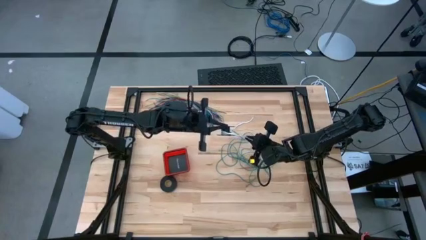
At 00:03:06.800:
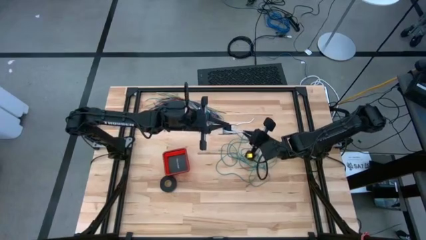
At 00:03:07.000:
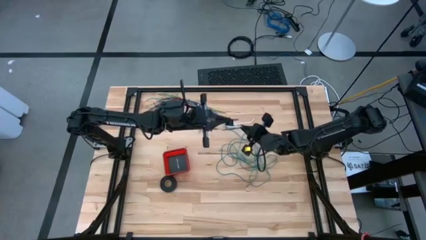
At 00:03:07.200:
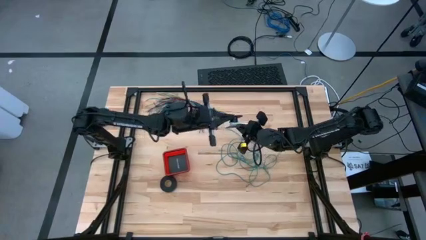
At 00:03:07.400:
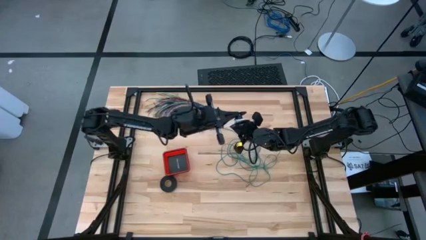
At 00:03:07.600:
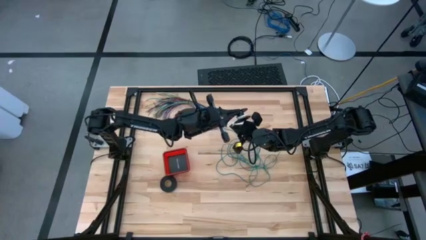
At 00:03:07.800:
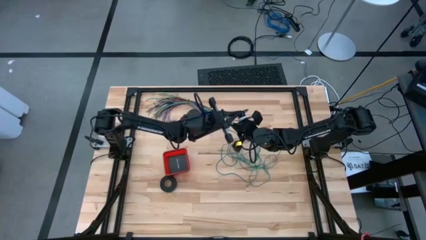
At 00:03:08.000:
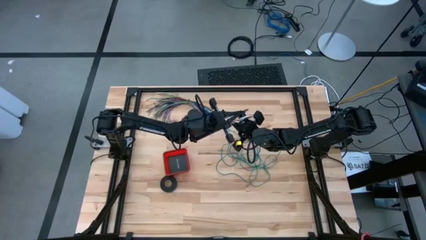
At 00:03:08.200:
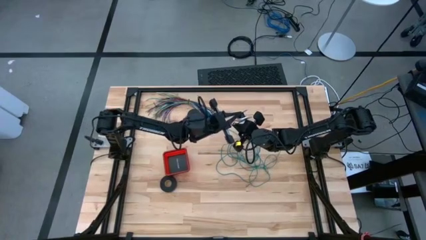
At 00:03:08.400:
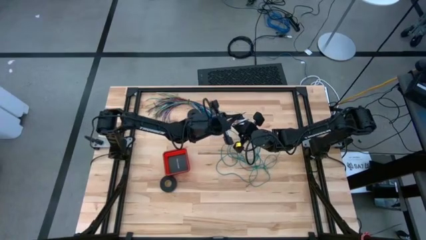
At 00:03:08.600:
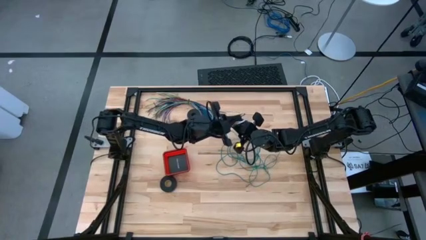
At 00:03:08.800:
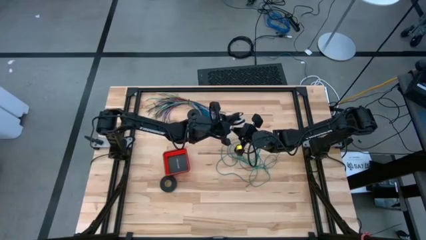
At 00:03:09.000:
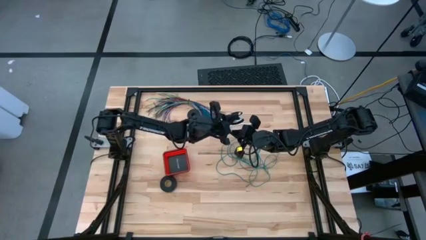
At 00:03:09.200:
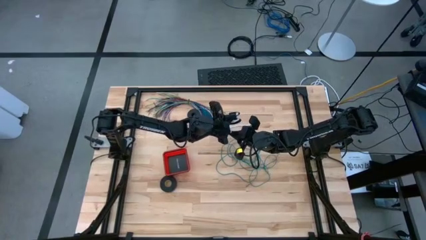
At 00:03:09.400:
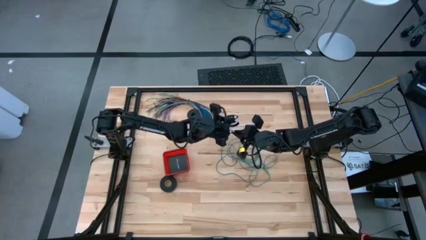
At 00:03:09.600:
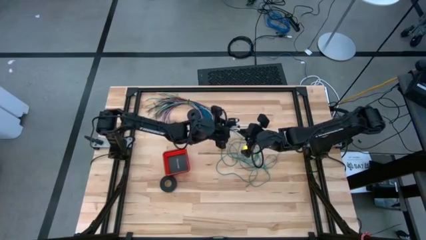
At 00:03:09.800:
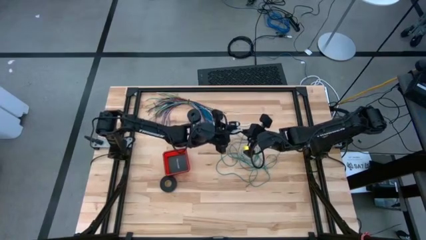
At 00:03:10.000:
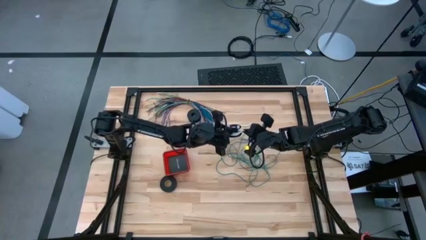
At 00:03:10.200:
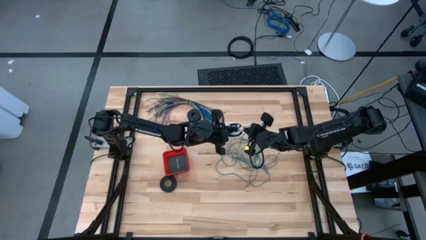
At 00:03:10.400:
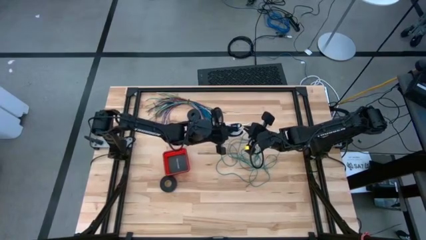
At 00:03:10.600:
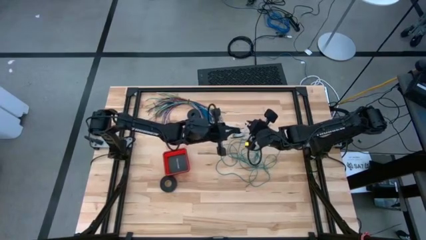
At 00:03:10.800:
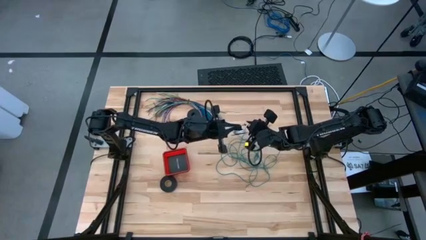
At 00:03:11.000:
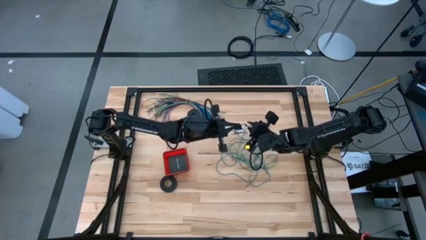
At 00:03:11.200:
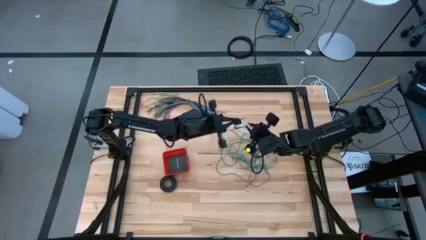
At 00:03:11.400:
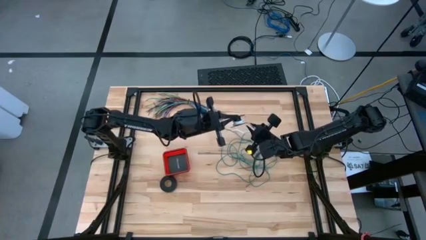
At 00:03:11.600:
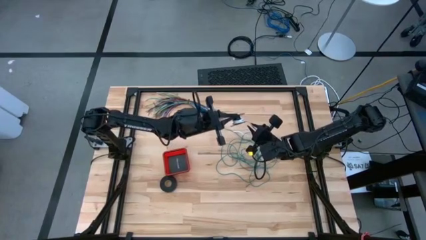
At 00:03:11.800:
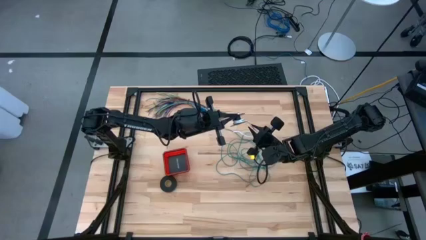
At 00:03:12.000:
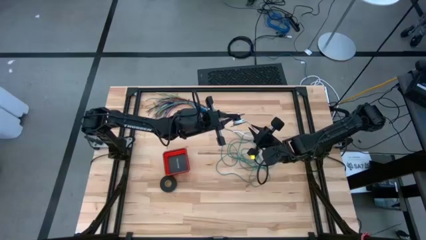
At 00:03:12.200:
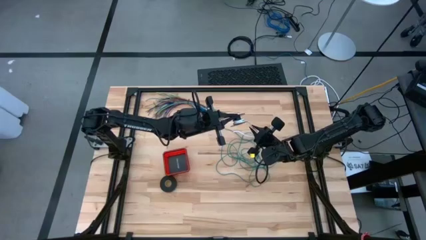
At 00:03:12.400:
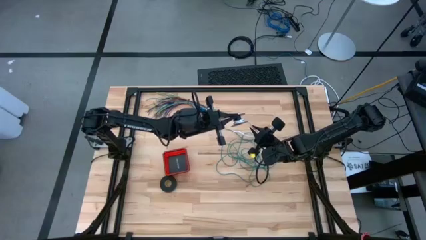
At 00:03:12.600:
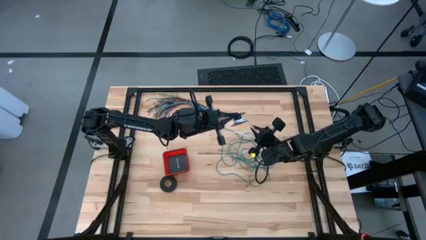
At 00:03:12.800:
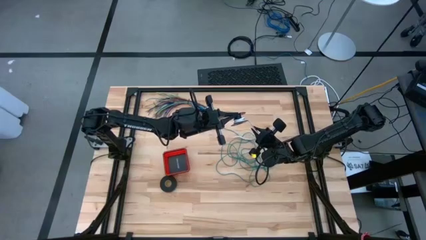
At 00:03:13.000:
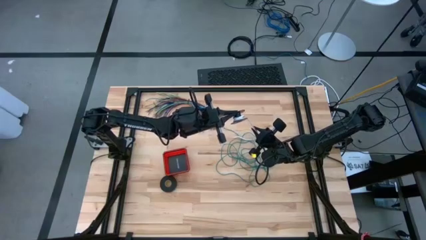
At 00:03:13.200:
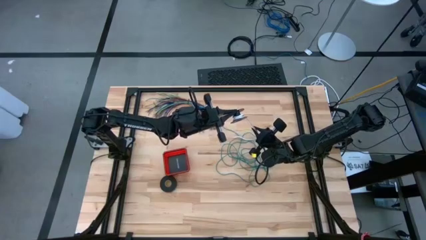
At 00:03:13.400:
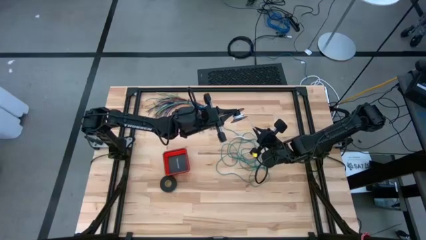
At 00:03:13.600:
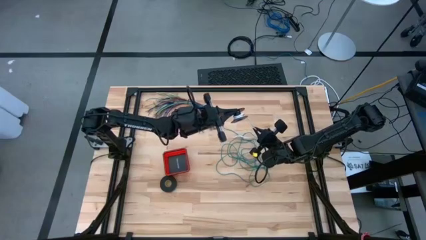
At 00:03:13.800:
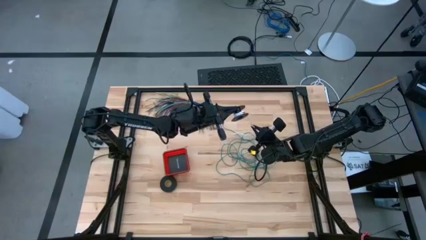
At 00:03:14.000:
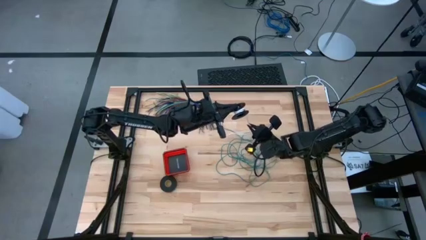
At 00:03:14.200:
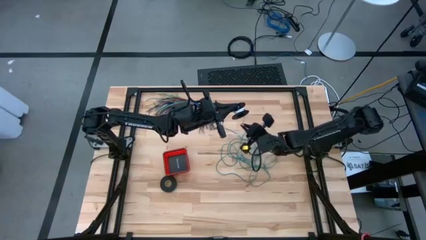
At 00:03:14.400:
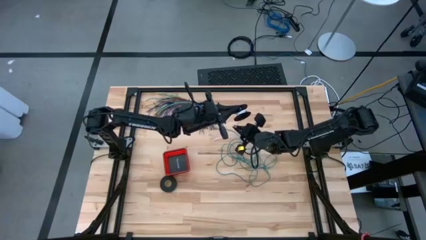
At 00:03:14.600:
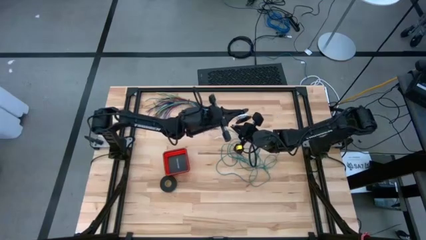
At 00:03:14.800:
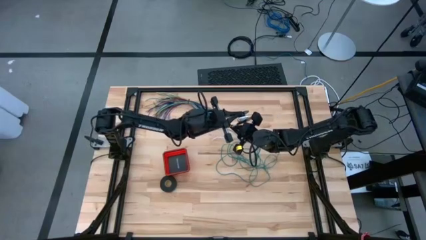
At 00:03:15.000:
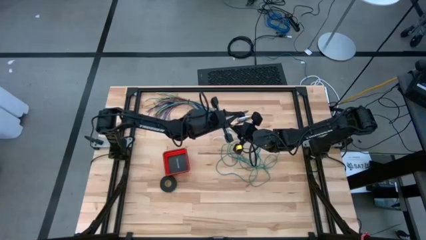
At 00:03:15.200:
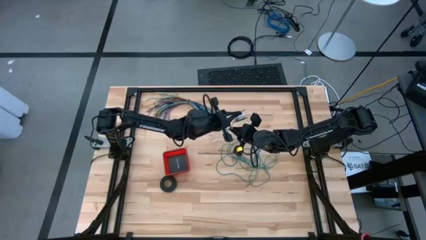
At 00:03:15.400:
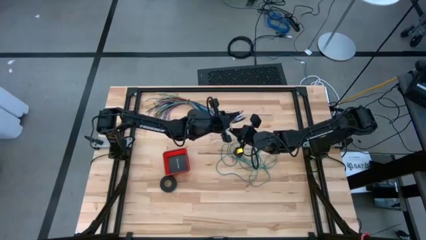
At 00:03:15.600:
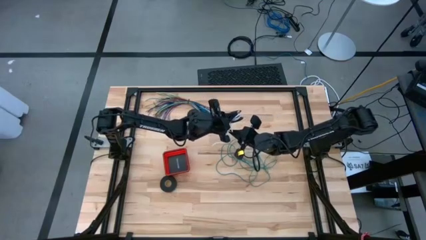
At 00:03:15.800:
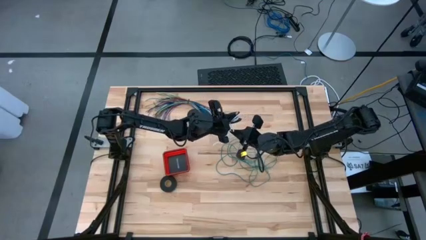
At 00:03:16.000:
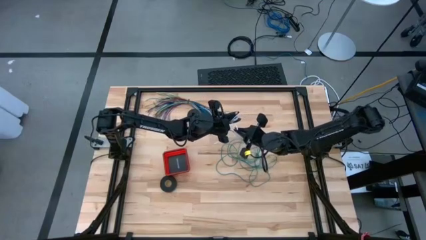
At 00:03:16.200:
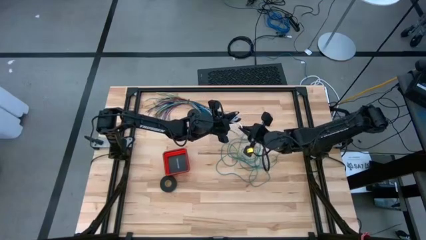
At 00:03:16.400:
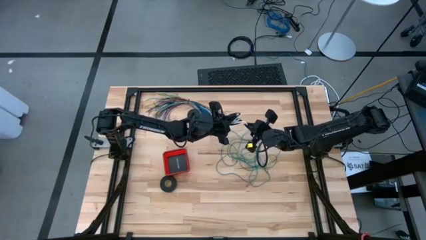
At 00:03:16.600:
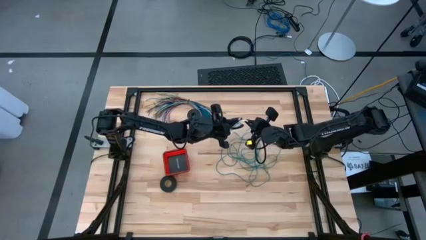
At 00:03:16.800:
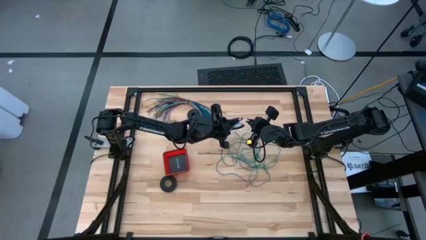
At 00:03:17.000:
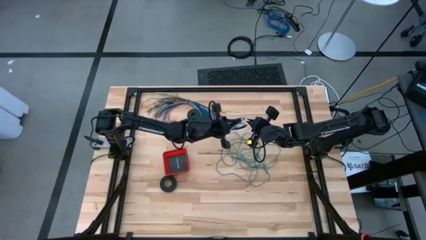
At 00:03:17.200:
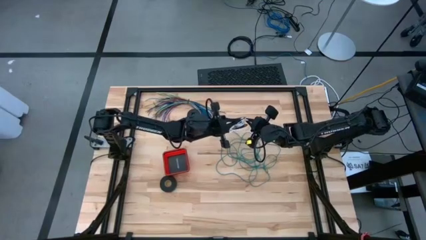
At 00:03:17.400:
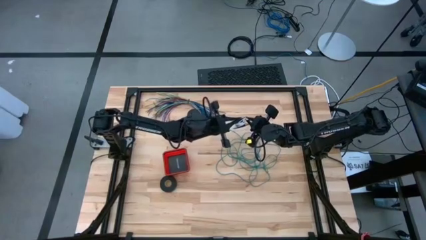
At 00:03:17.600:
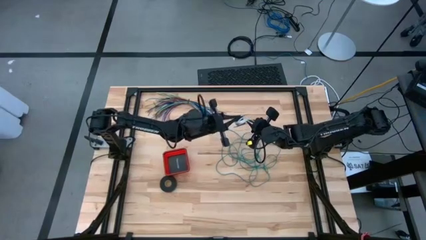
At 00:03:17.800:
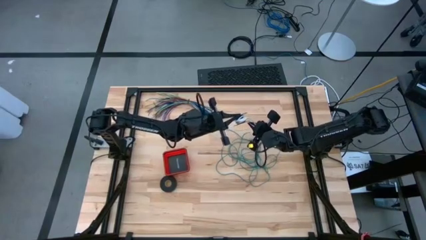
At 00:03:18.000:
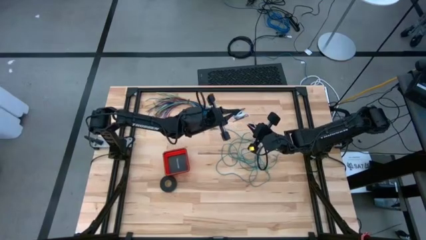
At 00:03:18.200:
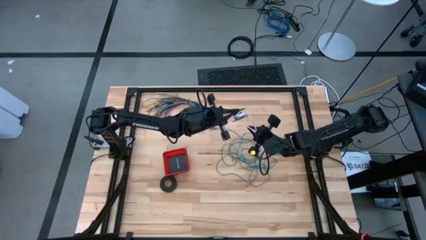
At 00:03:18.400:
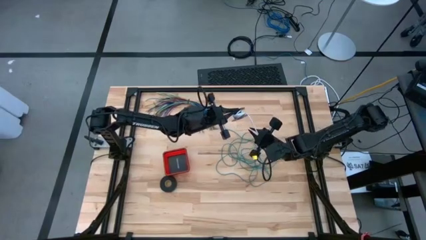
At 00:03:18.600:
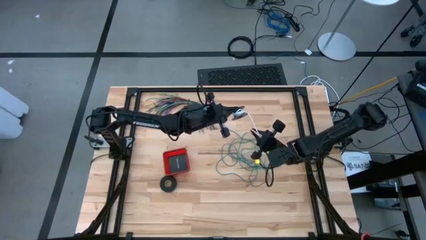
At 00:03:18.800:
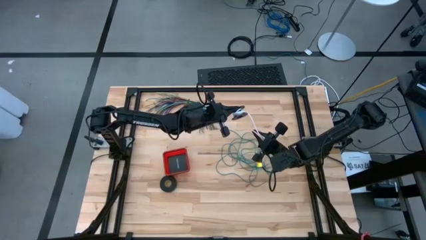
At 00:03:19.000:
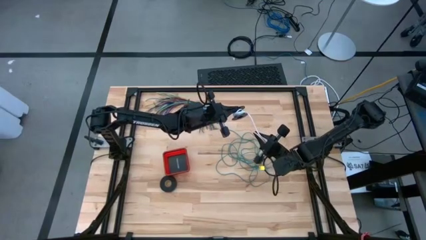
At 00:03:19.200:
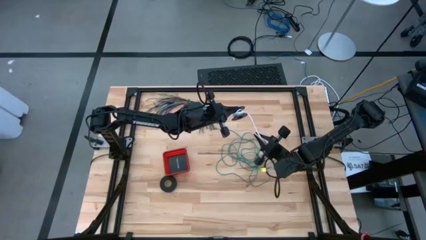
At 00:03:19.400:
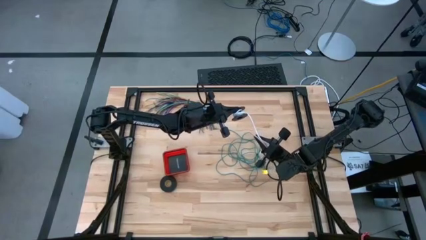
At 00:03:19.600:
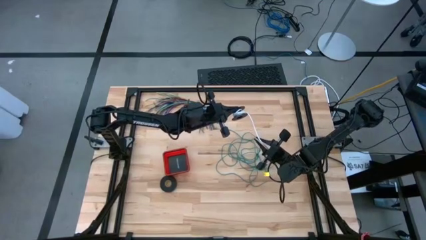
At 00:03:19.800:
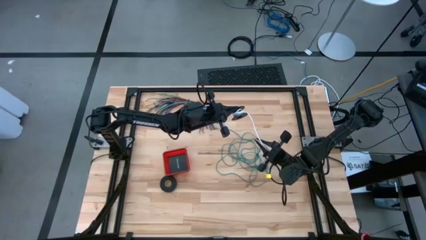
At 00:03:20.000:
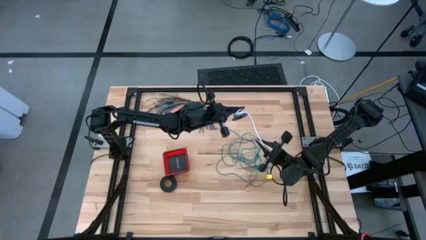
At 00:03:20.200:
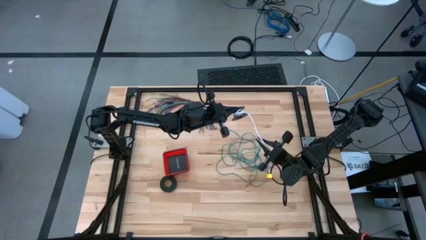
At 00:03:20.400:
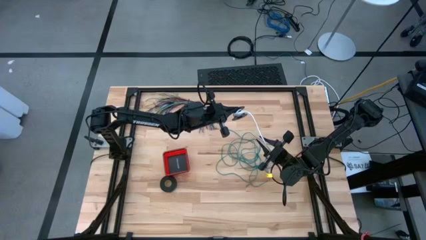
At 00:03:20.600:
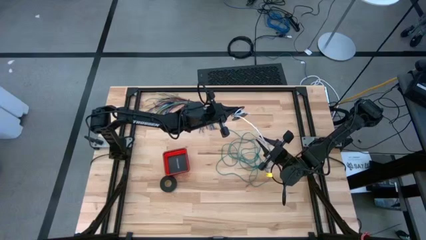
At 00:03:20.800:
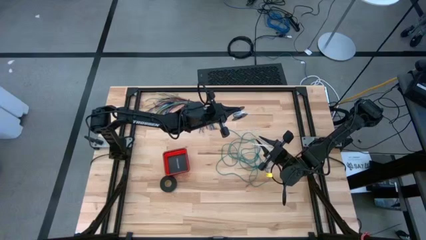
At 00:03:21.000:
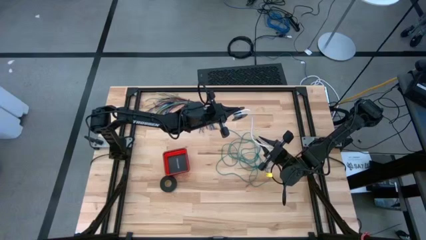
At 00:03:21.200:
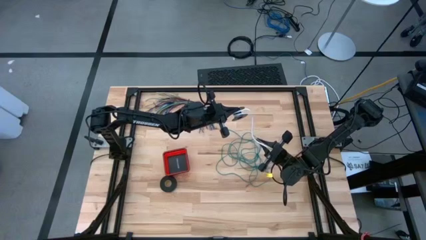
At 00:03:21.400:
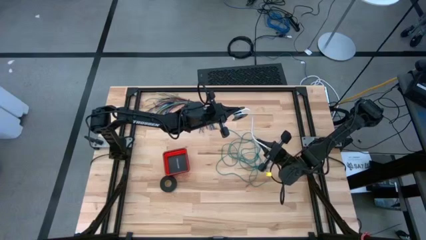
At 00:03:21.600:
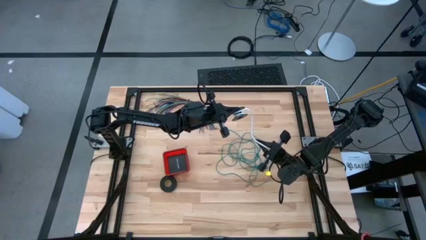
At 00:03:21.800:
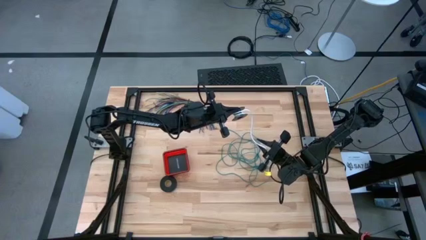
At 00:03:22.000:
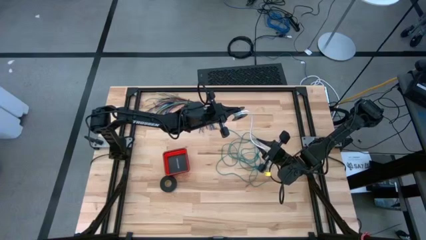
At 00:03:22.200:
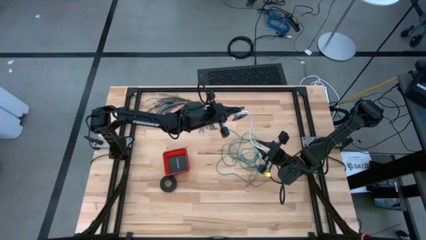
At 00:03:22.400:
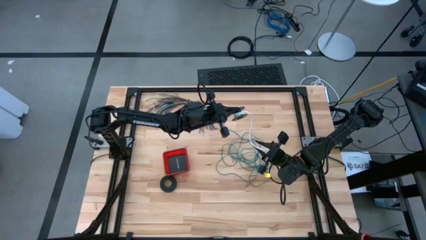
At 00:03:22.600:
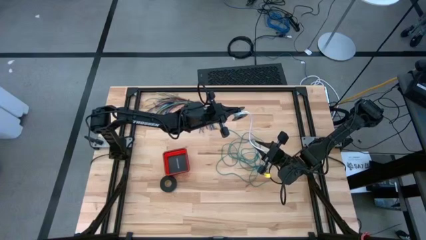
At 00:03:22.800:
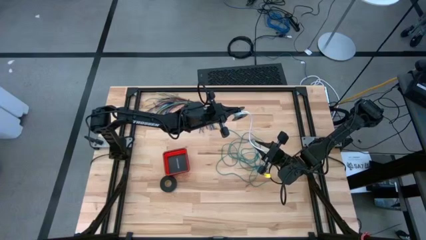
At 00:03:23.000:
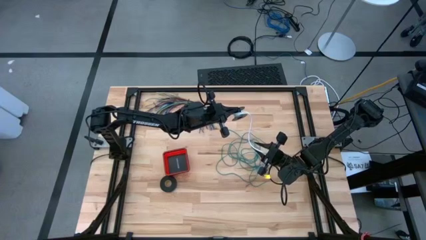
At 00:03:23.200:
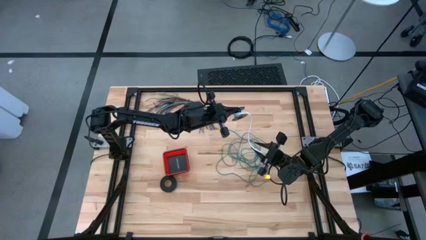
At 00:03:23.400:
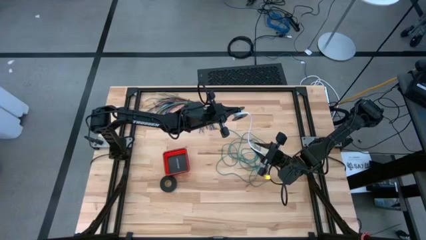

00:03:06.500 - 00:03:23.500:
Task: Coil cords
Coil the white wire onto the spool
